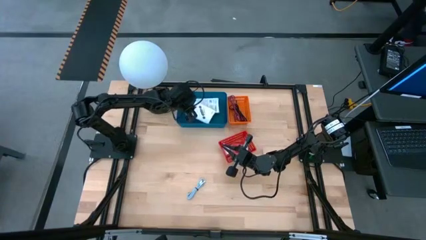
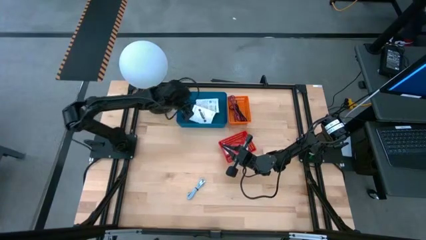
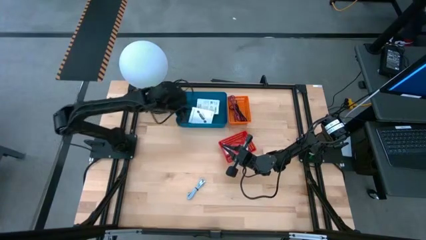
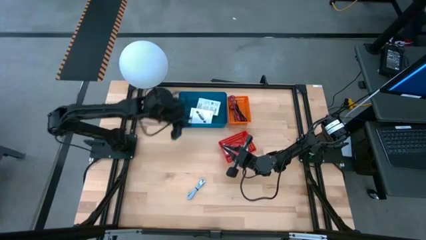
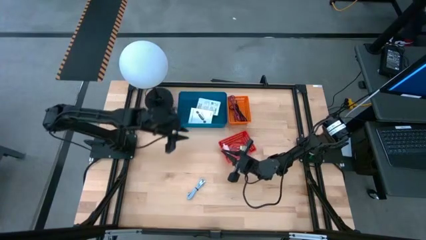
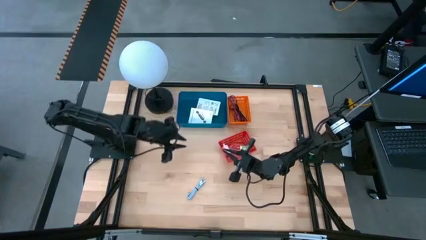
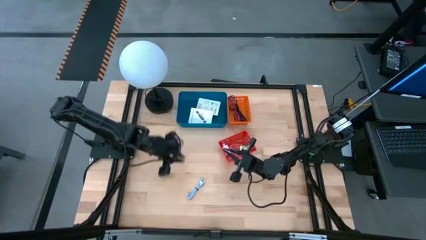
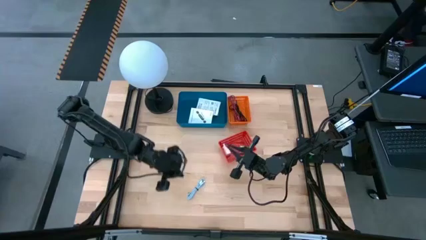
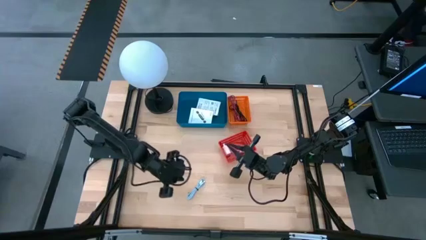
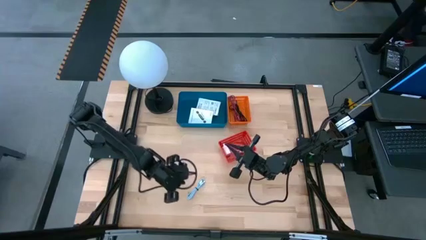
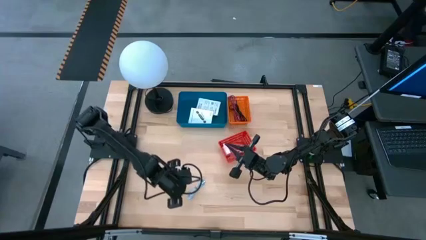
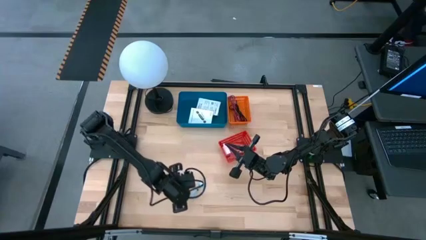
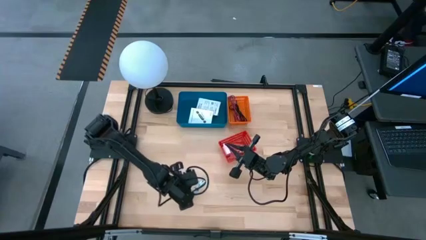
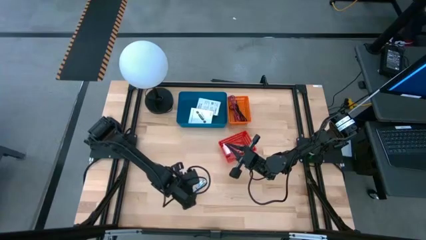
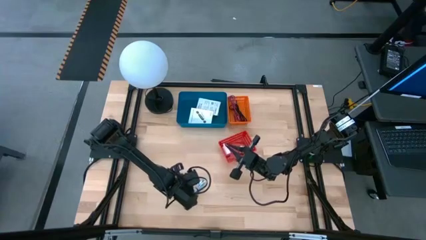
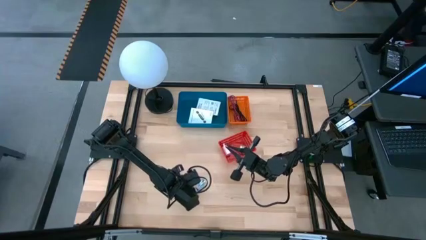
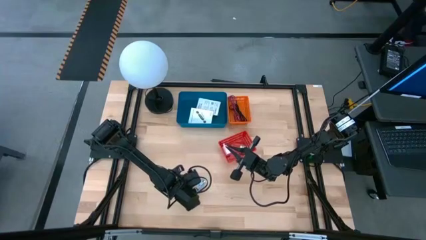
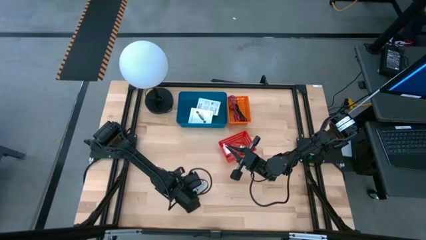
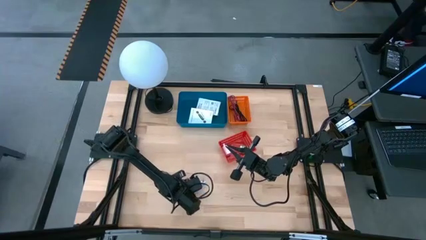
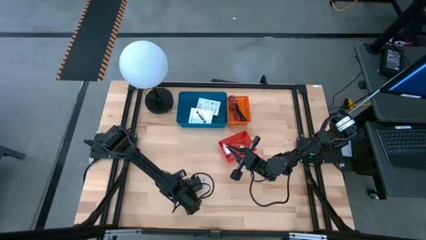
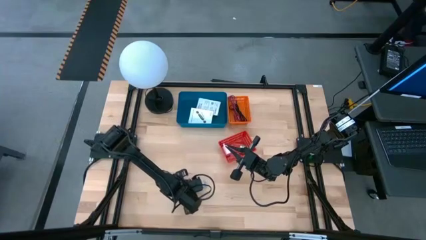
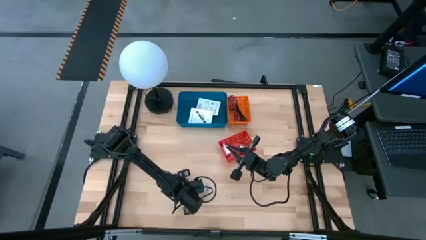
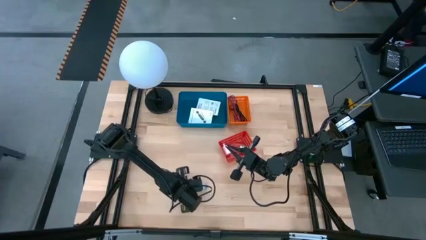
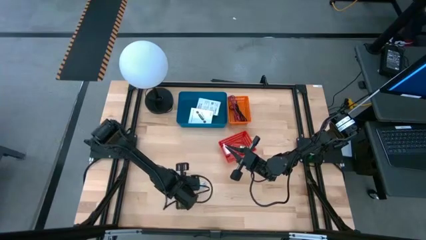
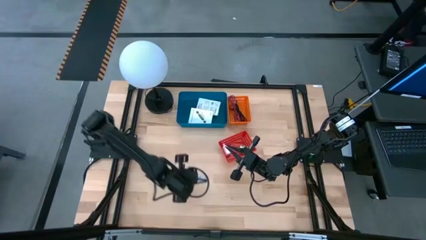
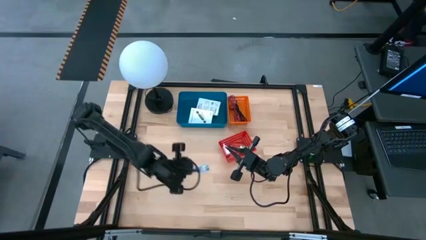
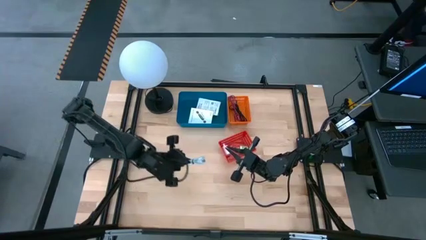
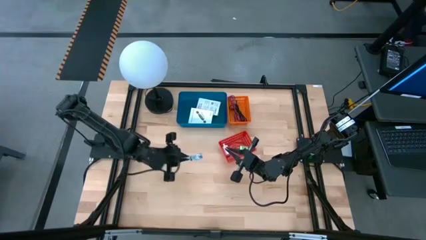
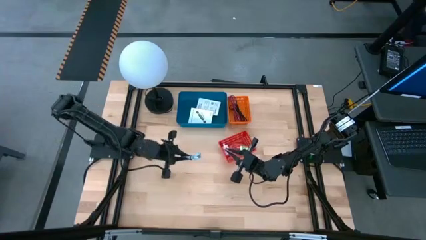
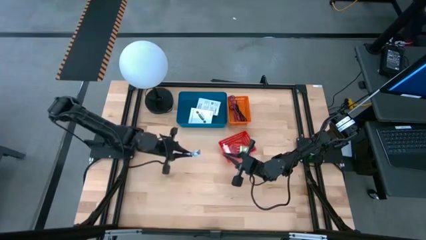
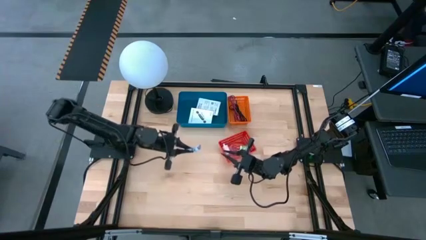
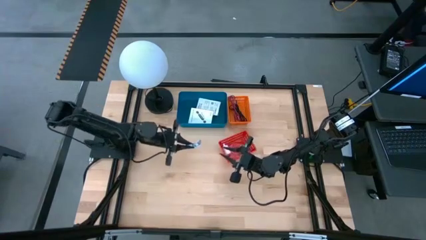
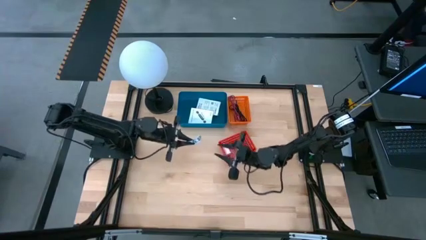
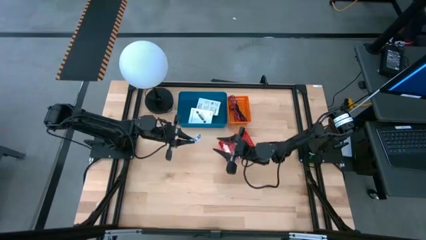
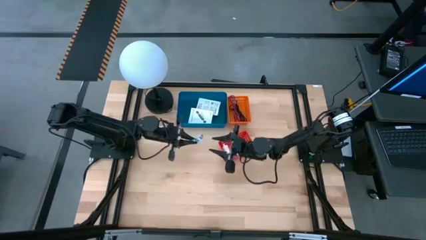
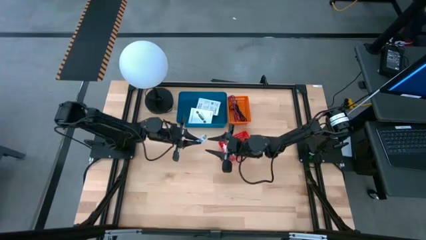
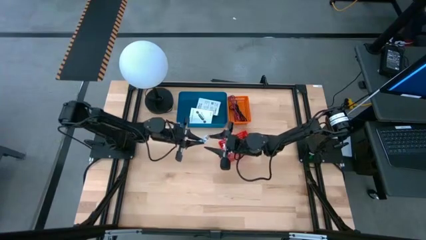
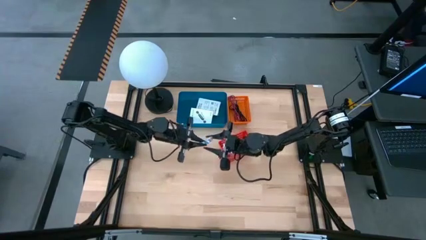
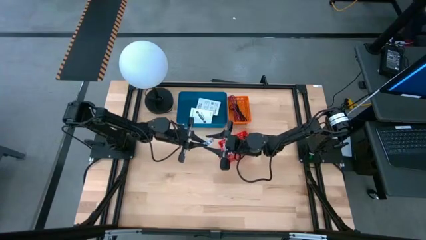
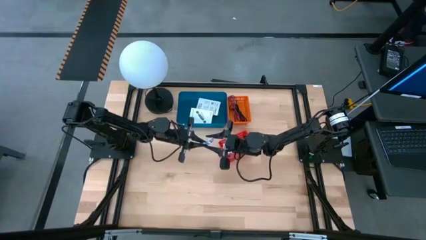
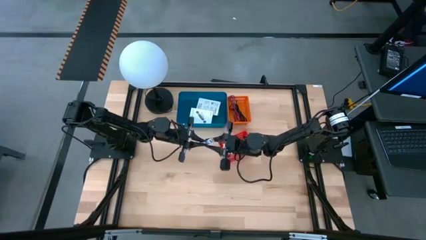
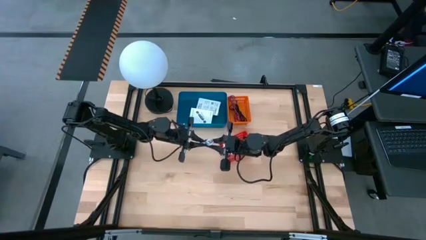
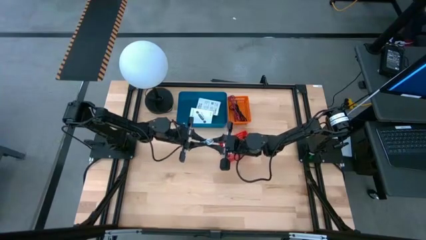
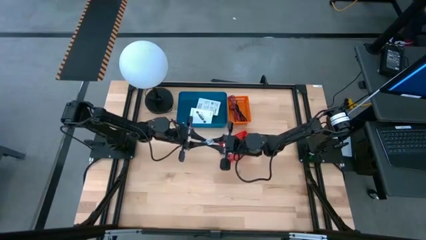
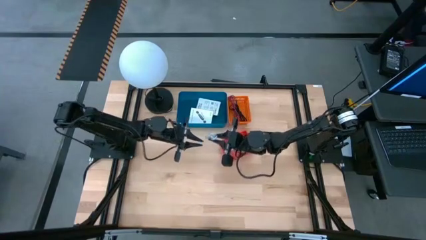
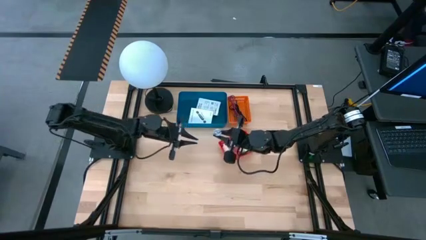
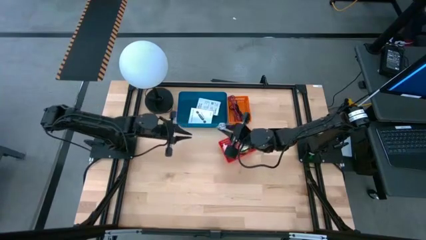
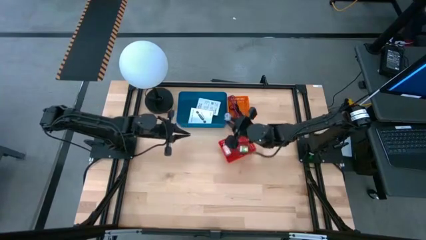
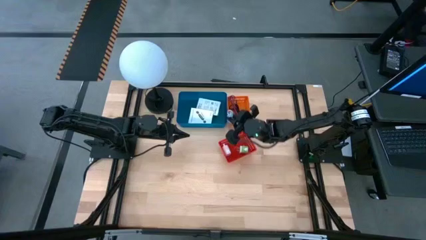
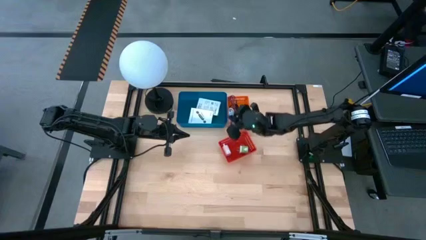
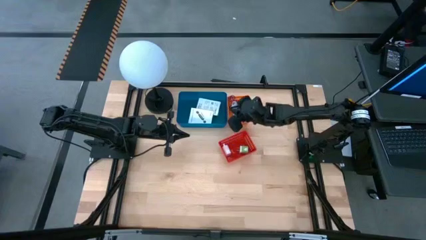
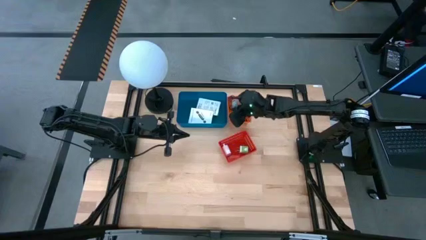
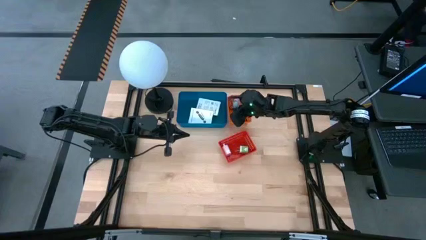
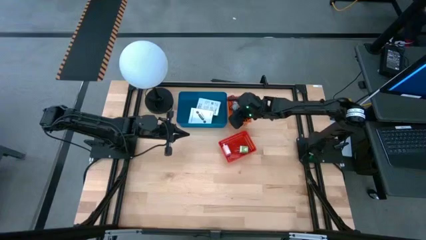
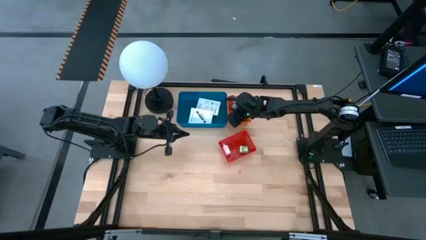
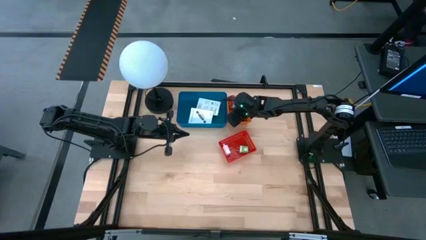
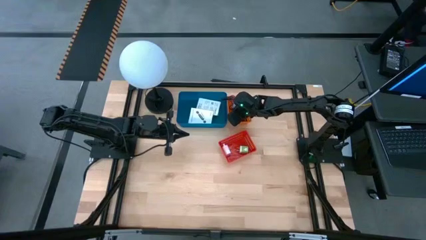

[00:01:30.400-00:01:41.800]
Task: Pick and place items into bin
Put the light blue charger cable into the orange bin

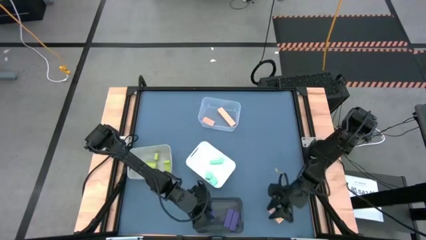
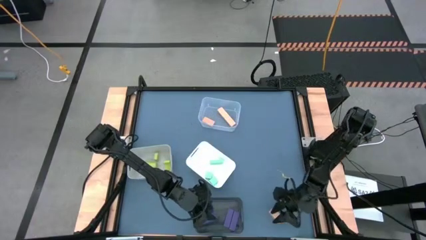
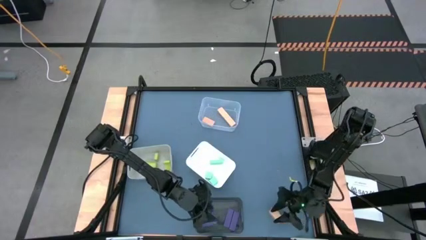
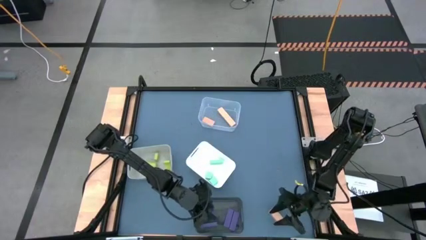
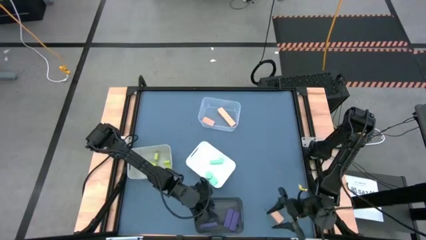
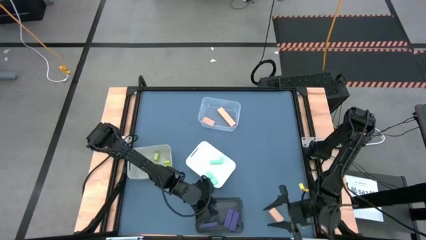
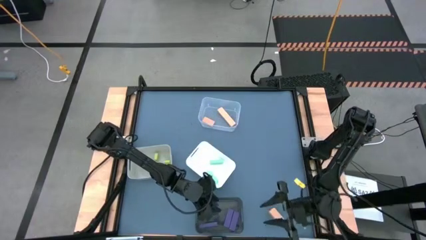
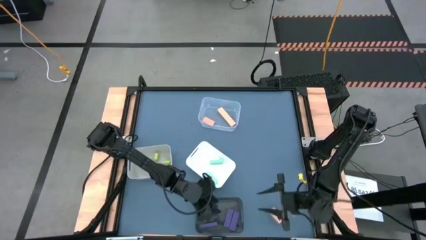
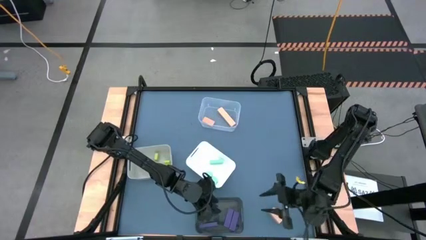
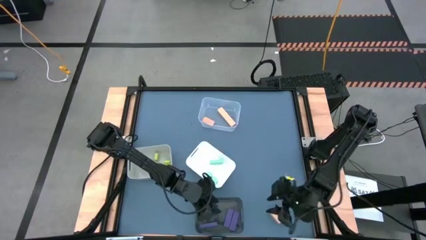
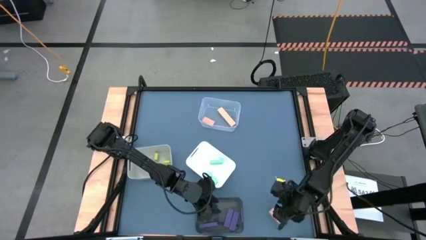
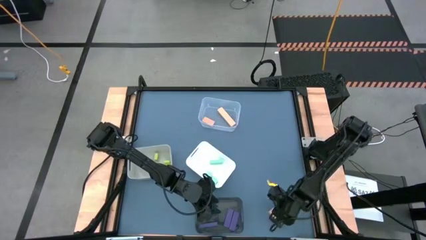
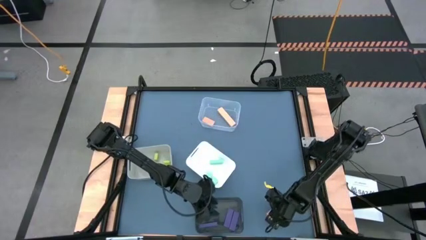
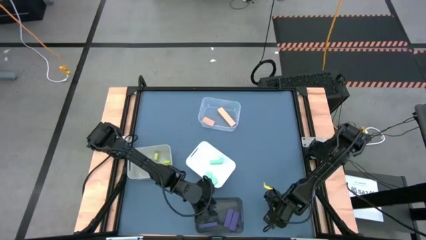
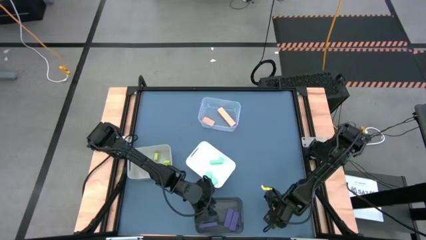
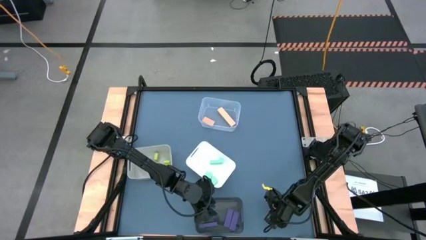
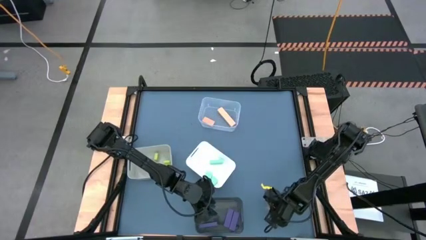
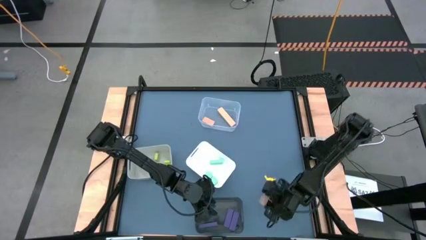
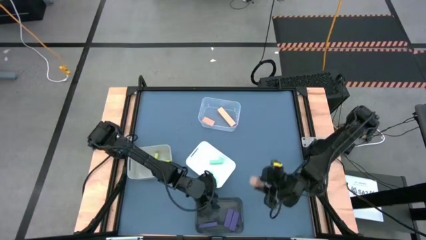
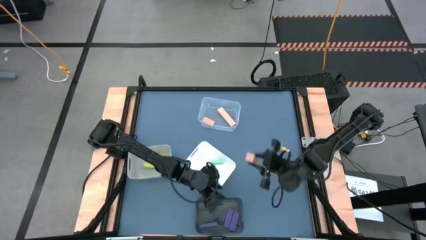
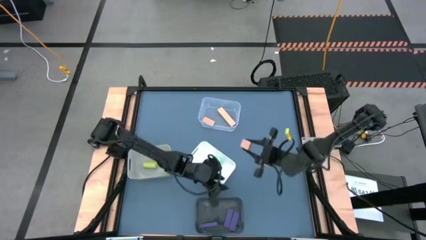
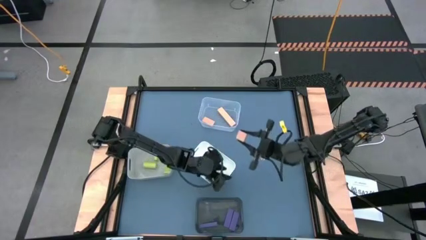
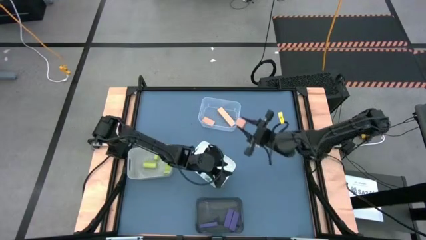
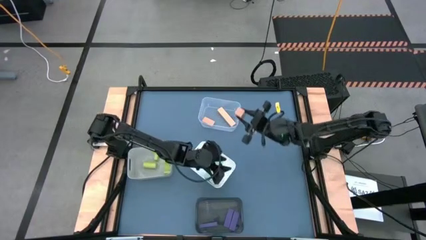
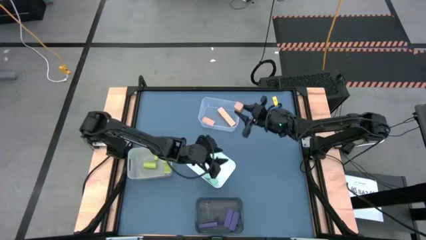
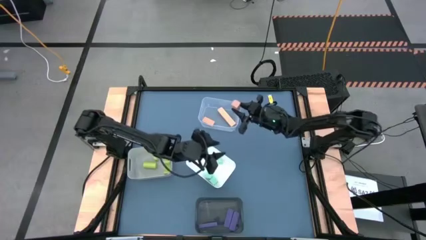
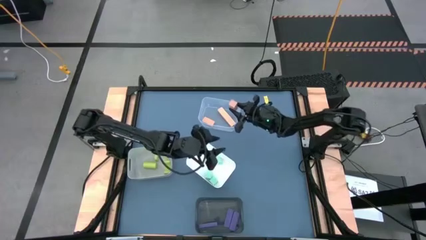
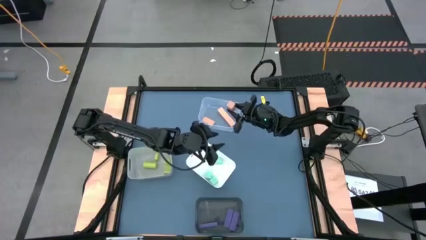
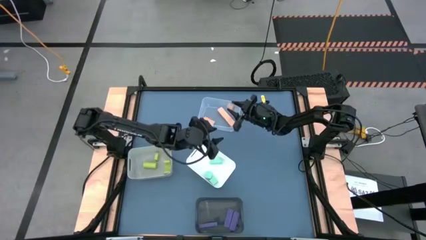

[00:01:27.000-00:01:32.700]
Task: Sort & place blocks by color
Put the light brown block into the transparent bin
